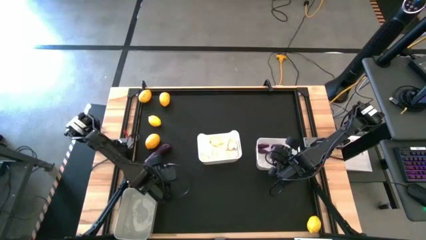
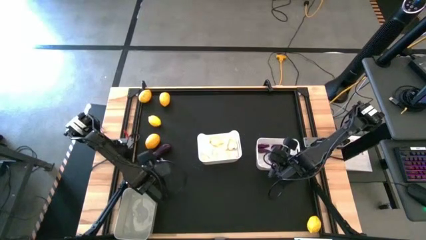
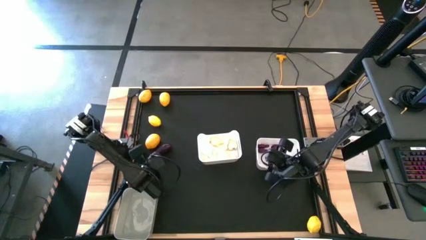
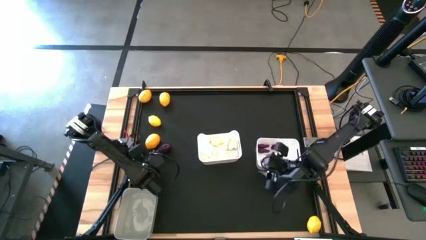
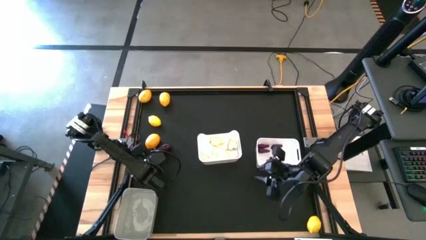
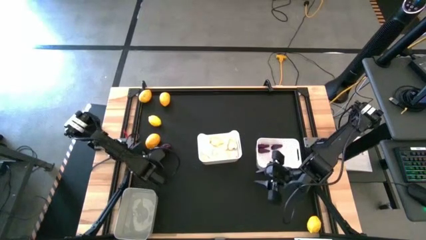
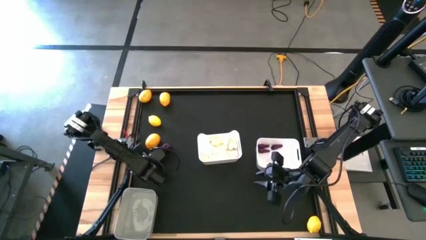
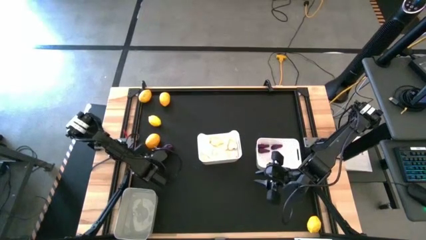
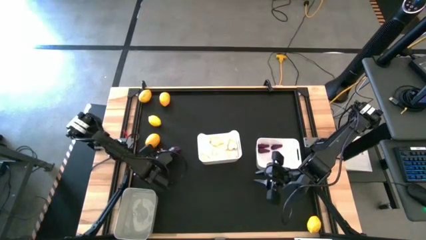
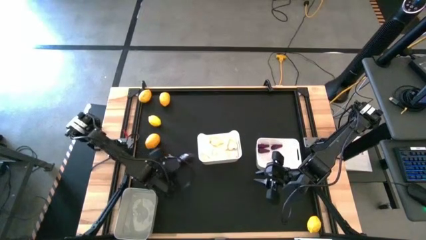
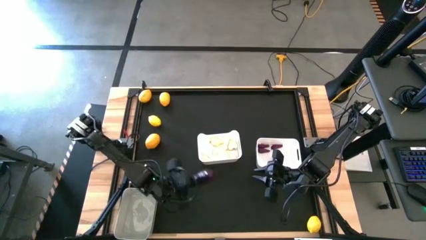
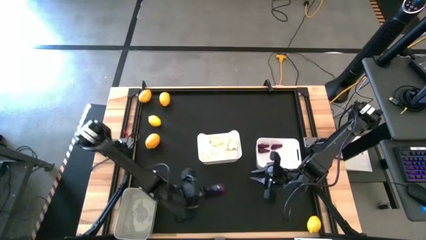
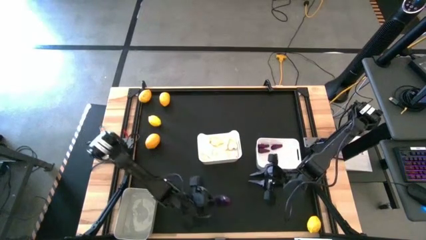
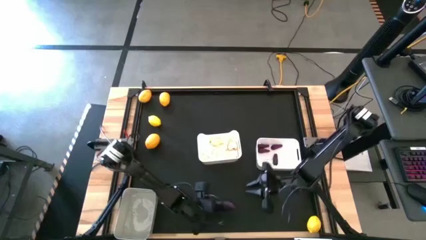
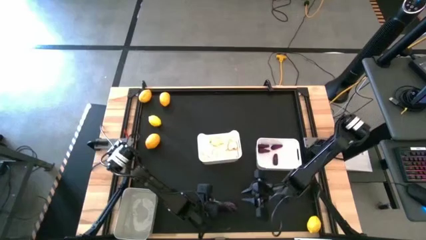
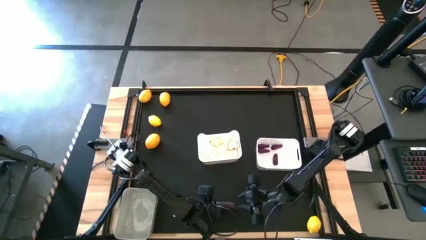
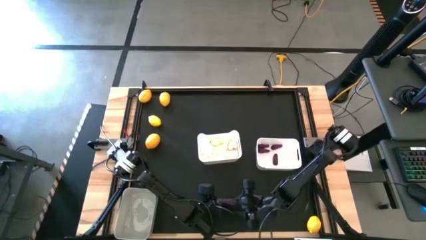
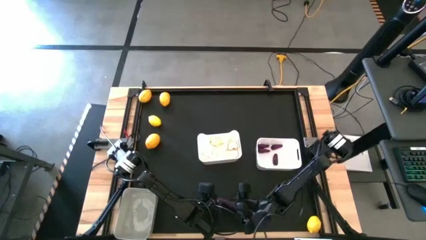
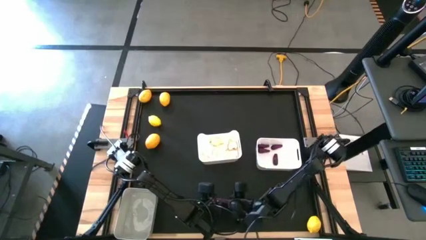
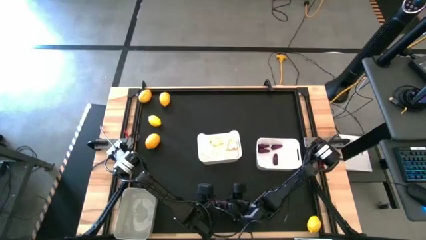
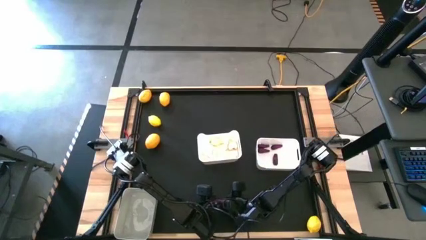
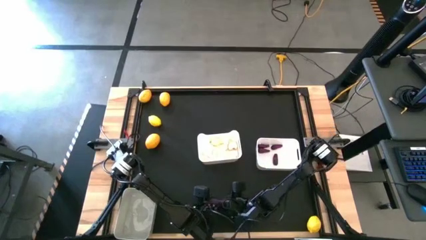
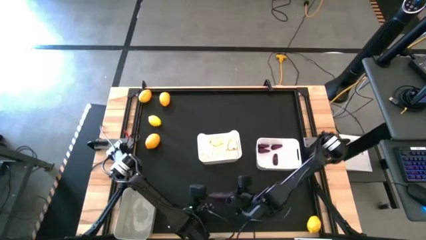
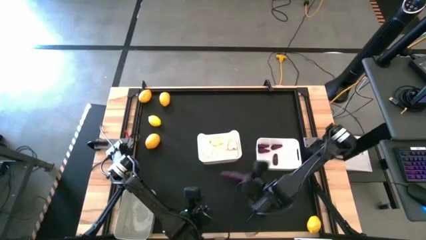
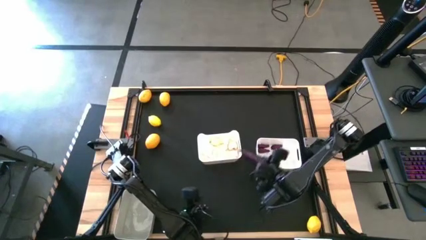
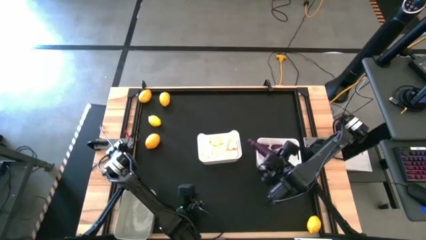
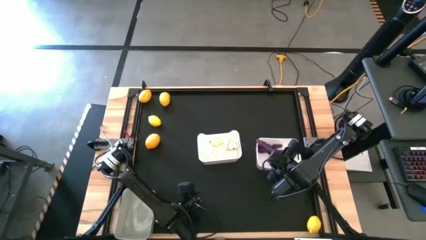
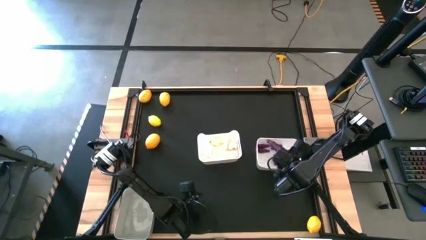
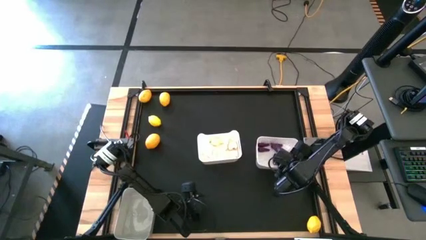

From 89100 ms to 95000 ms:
Task: Sort produce into baskets
Put the eggplant into the right white bin

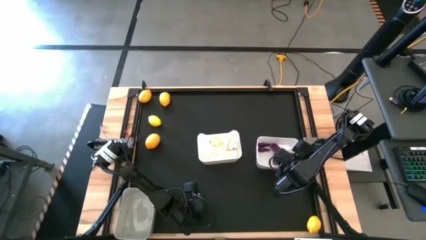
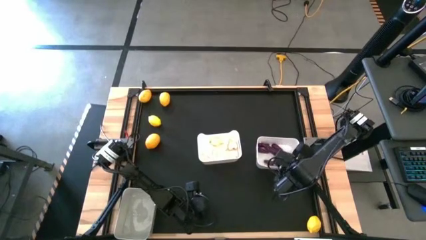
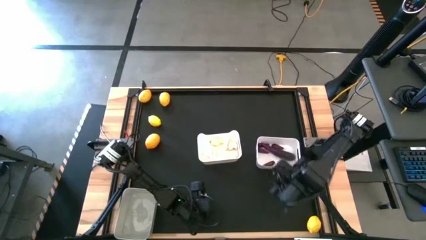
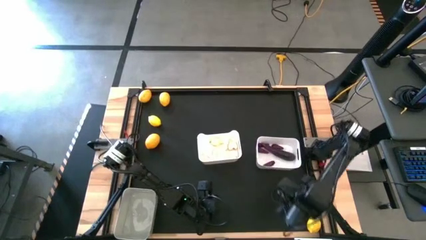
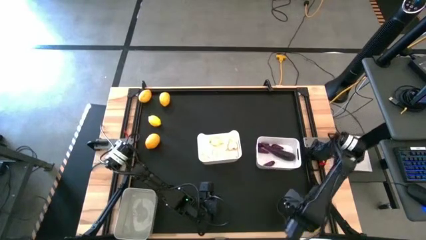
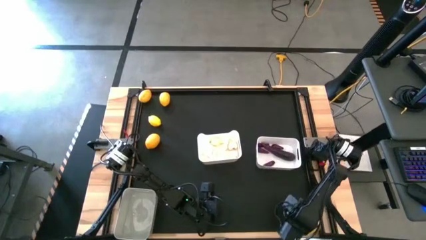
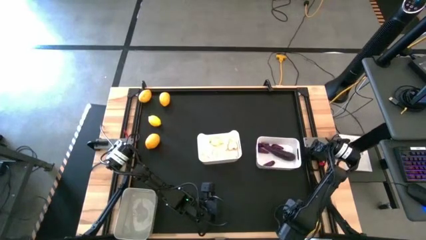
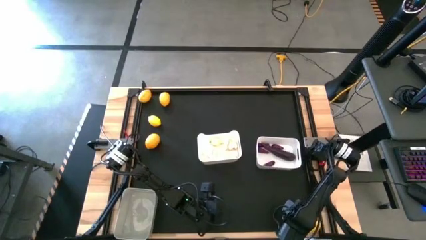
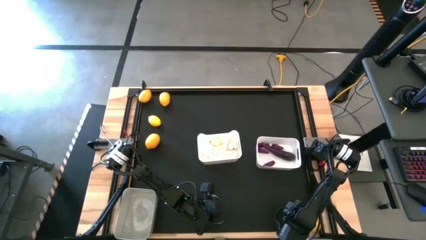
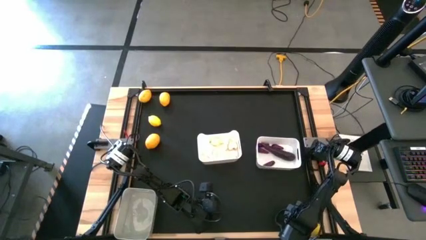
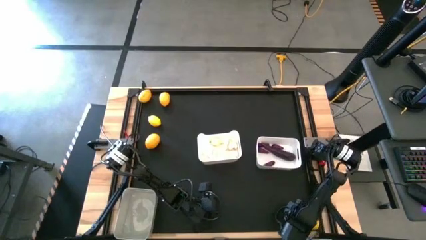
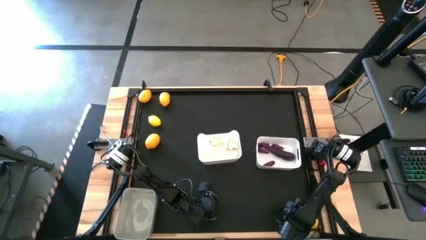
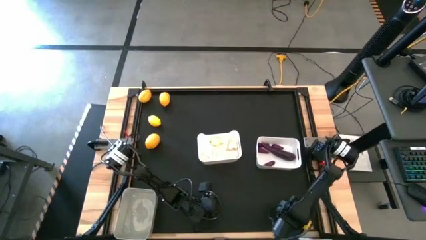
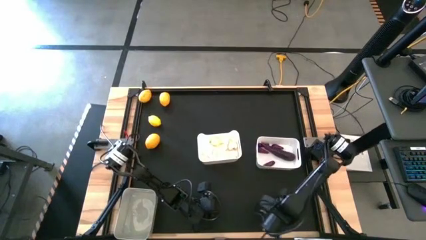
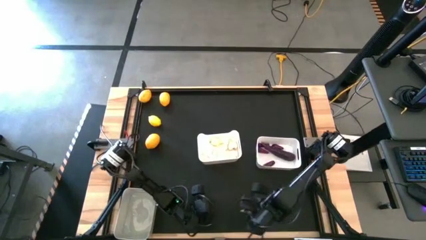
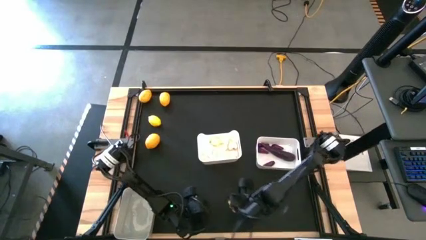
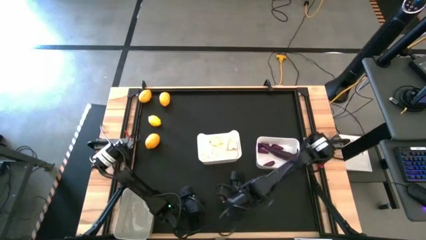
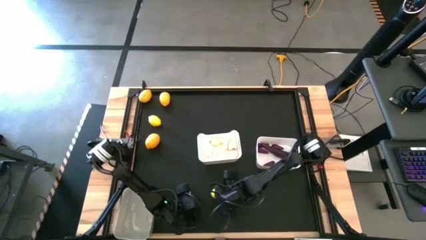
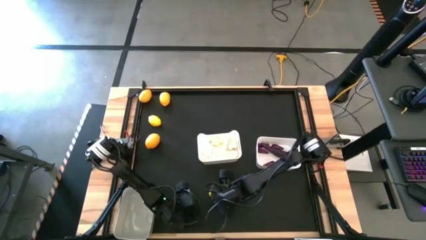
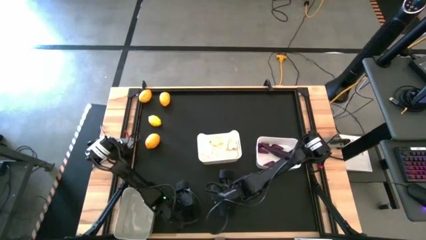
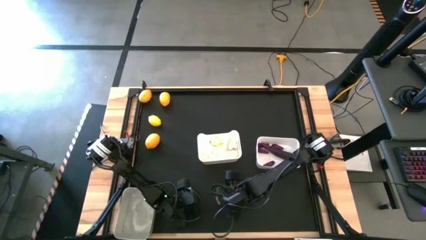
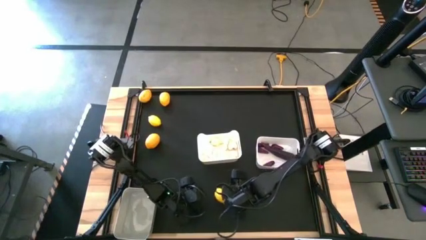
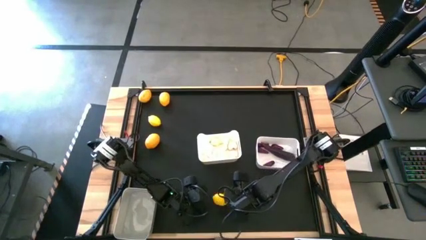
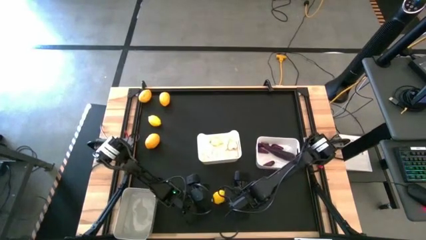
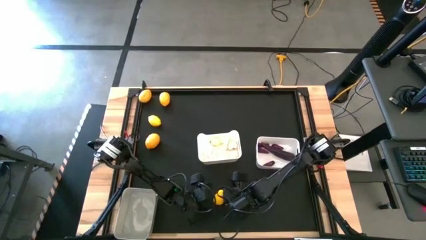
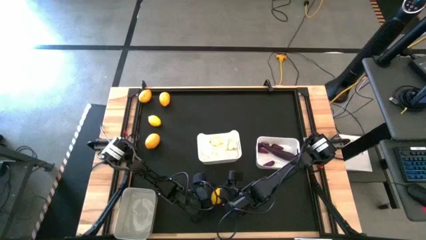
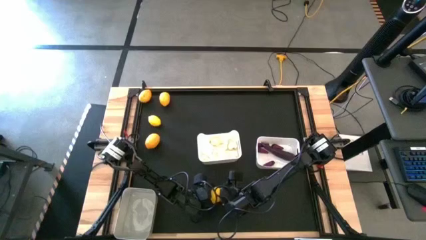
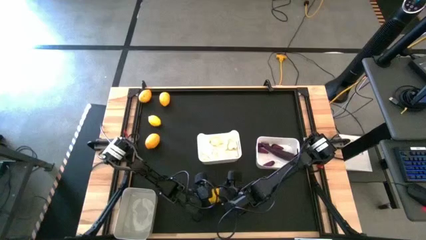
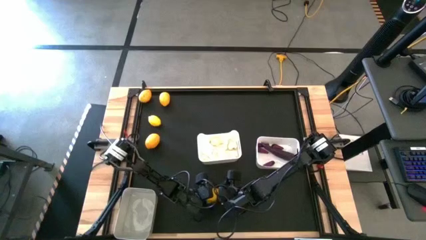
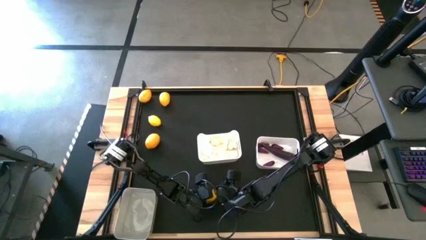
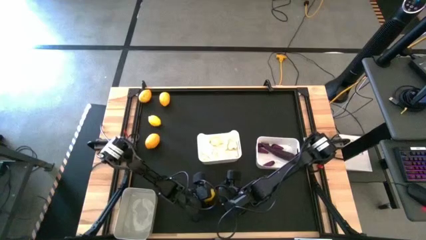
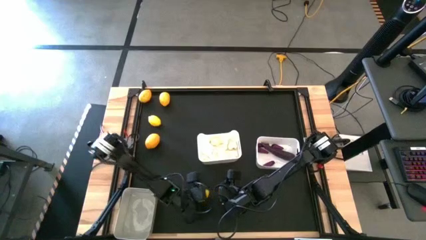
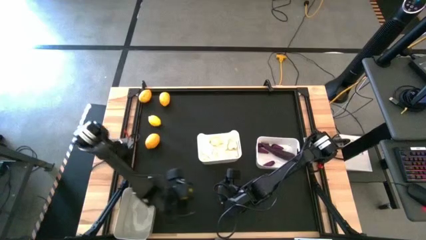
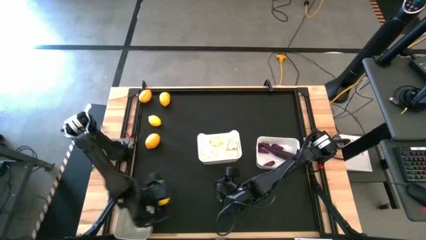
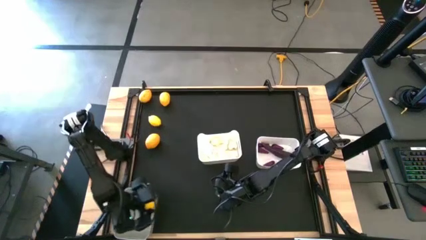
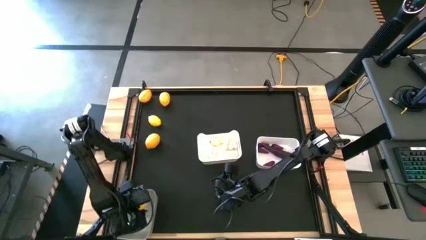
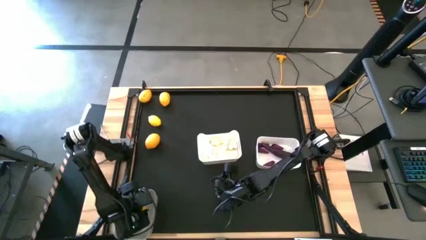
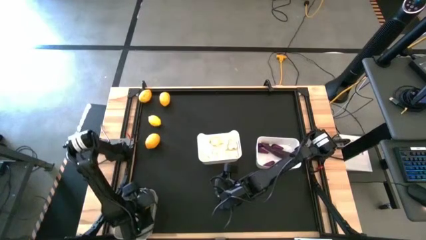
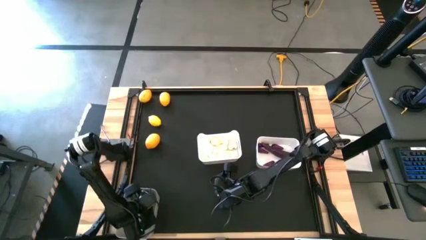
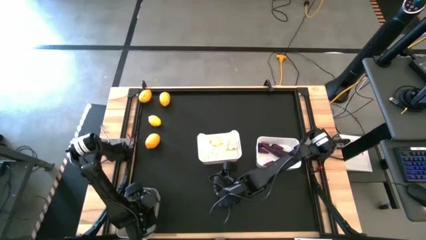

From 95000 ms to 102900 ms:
Put the lemon into the gray bin

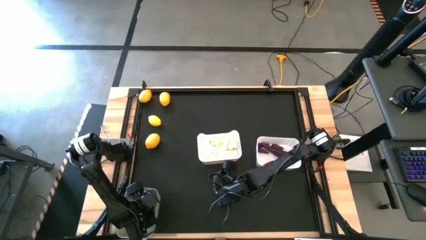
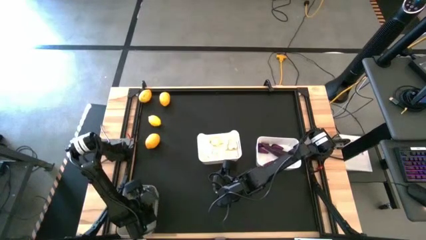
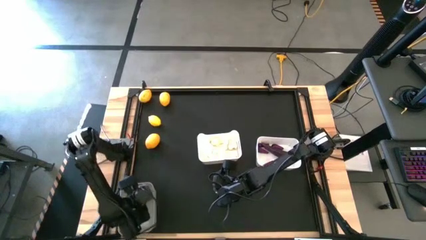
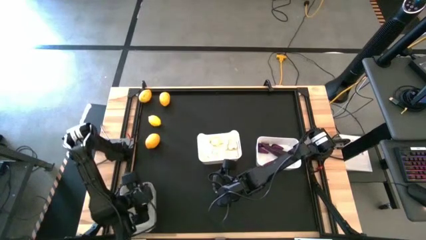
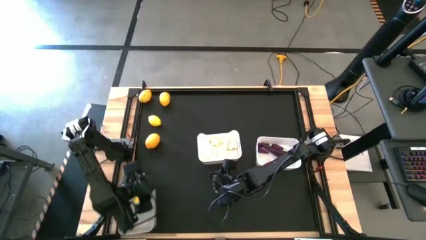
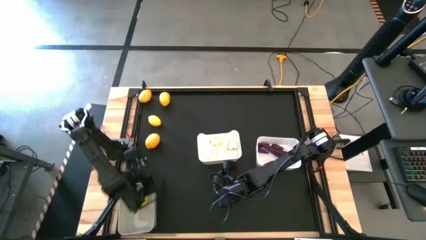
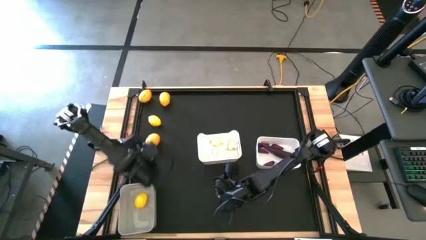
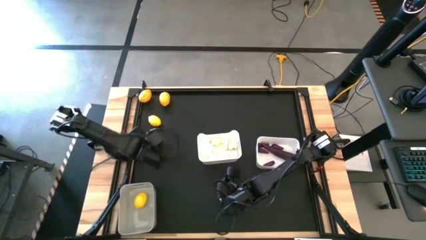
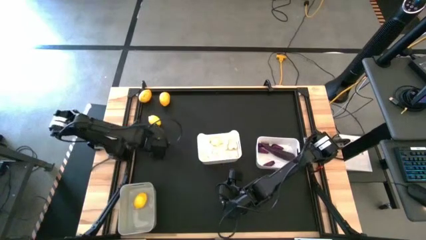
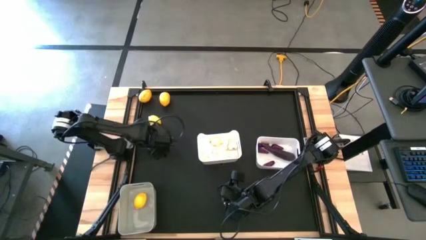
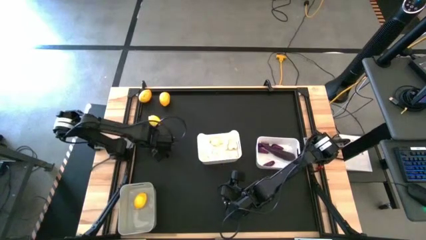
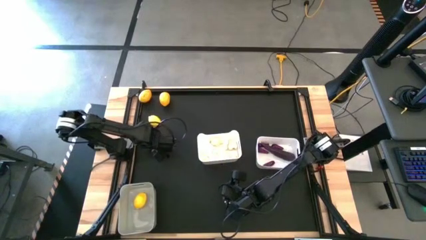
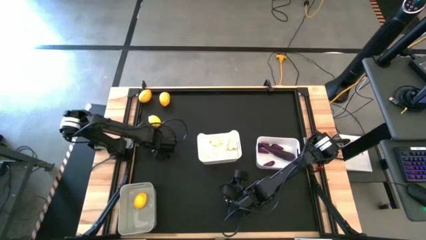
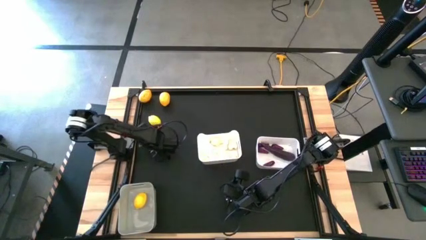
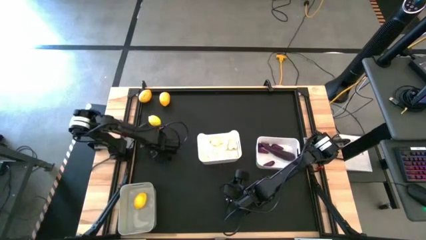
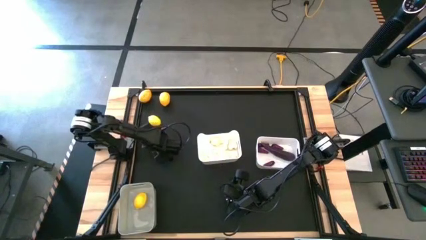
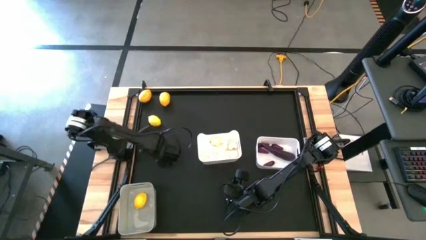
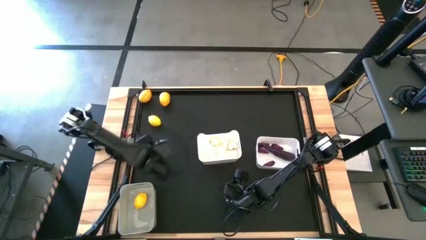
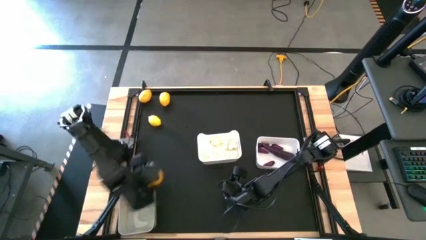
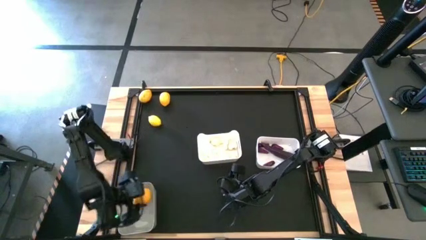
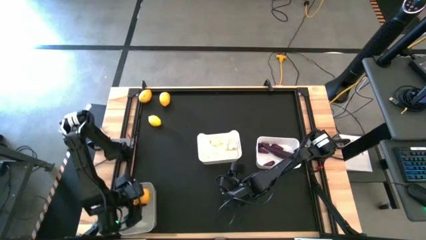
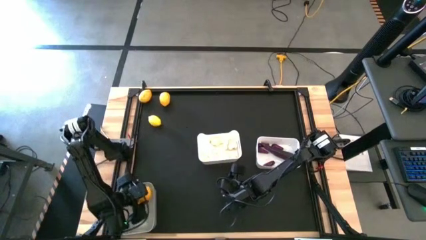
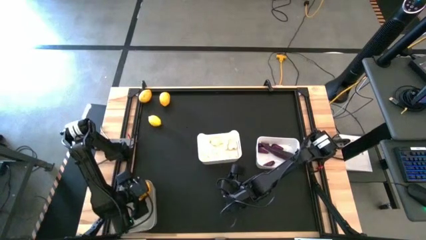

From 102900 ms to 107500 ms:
Put the lemon into the gray bin
